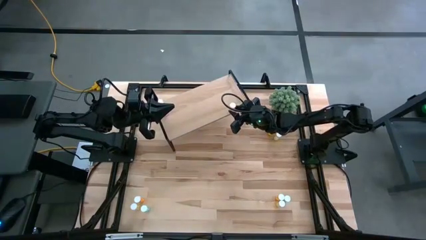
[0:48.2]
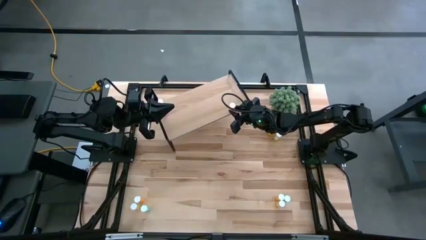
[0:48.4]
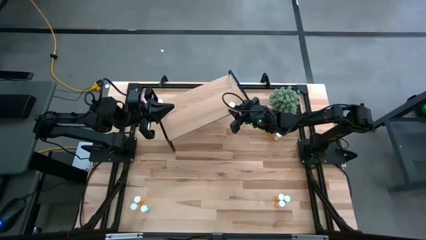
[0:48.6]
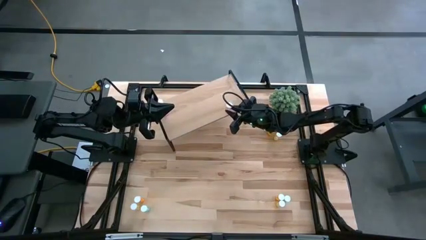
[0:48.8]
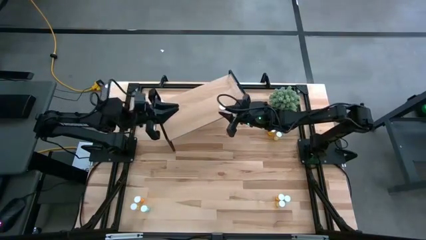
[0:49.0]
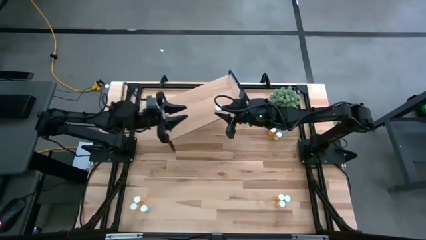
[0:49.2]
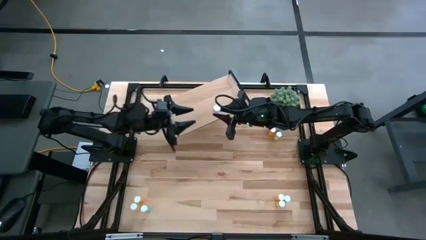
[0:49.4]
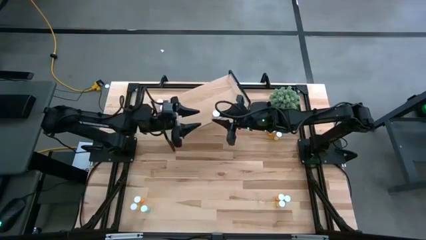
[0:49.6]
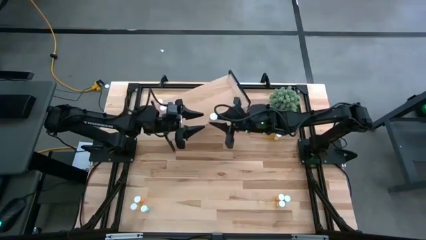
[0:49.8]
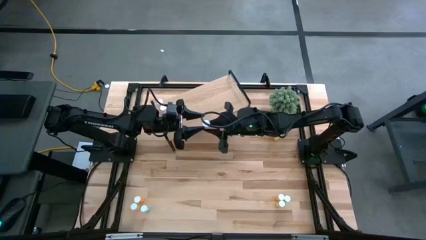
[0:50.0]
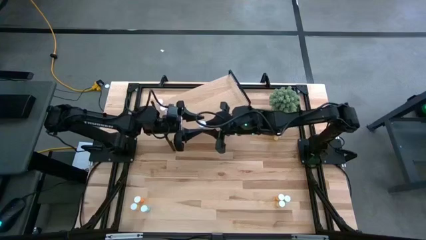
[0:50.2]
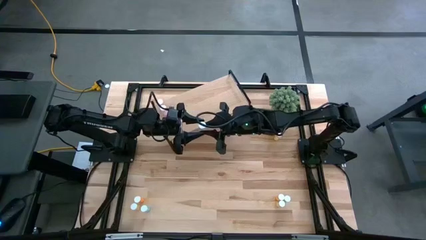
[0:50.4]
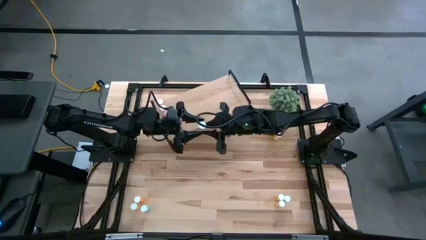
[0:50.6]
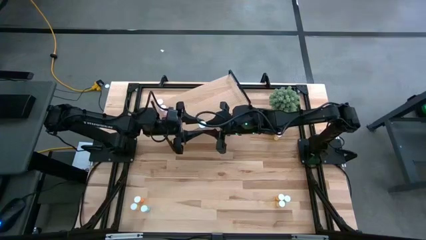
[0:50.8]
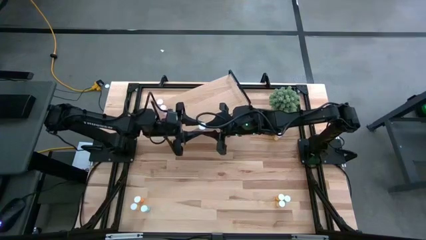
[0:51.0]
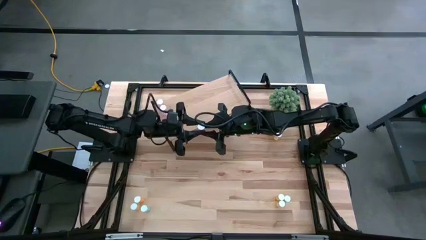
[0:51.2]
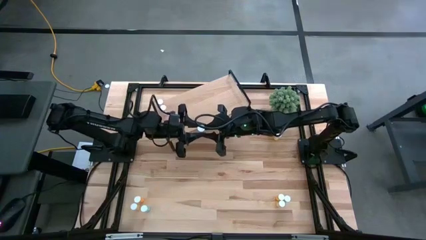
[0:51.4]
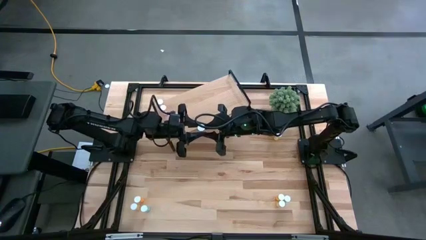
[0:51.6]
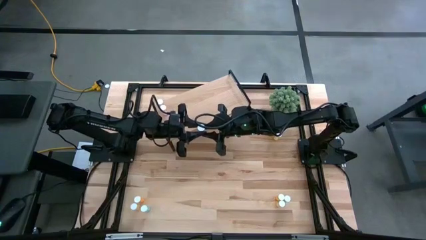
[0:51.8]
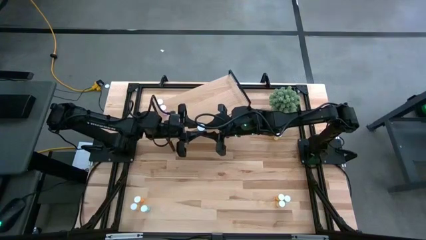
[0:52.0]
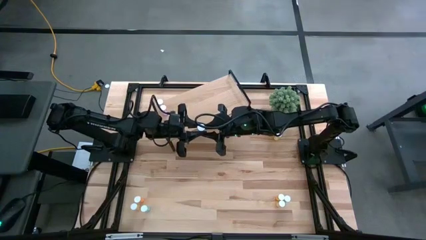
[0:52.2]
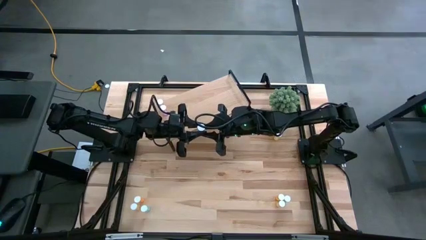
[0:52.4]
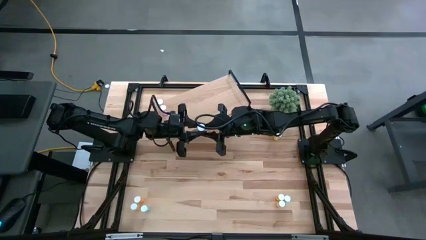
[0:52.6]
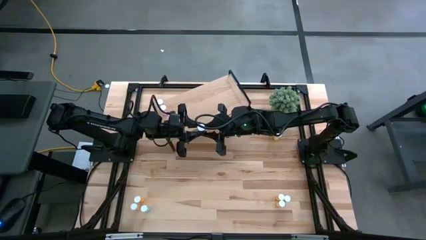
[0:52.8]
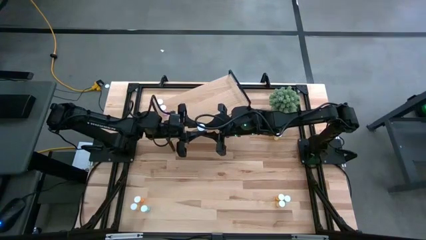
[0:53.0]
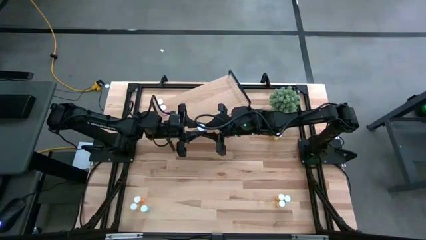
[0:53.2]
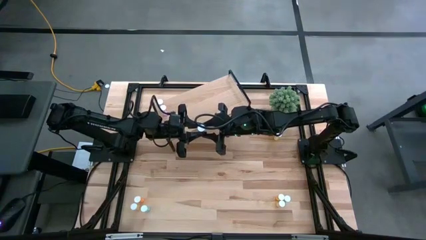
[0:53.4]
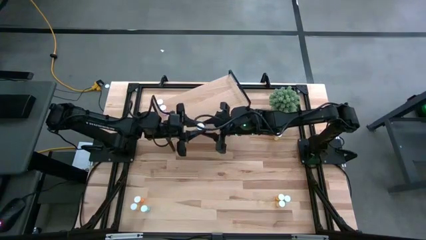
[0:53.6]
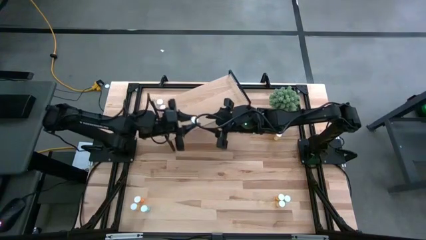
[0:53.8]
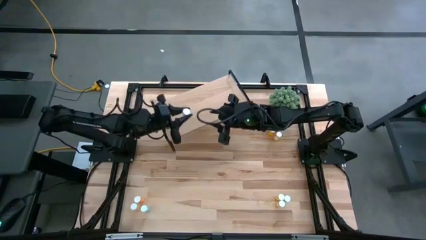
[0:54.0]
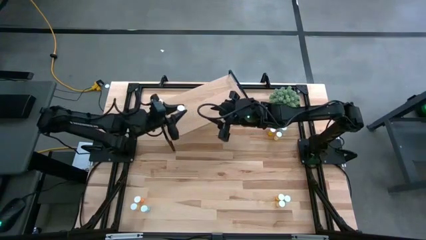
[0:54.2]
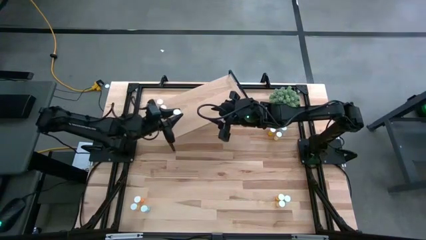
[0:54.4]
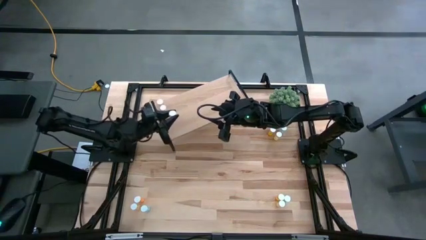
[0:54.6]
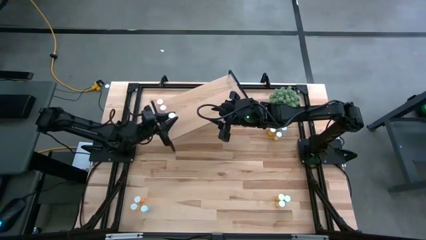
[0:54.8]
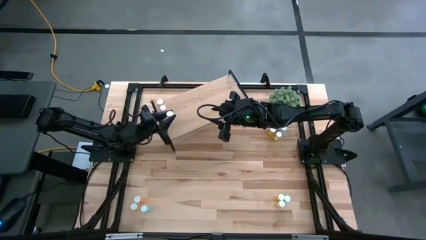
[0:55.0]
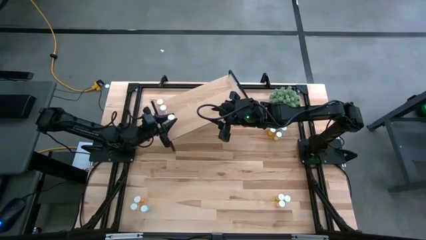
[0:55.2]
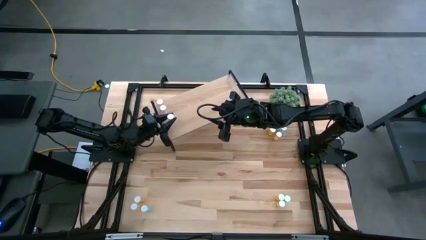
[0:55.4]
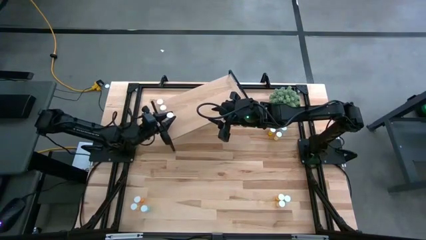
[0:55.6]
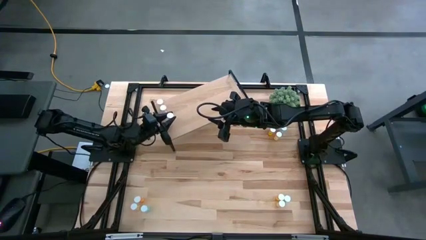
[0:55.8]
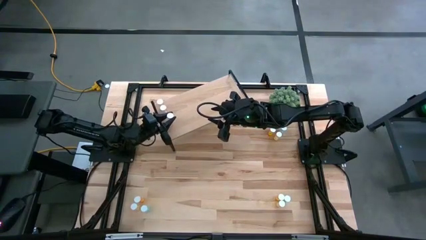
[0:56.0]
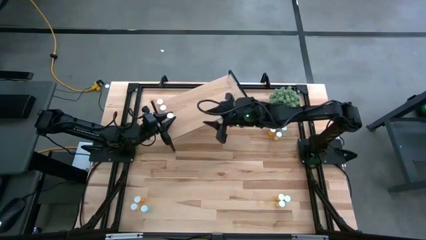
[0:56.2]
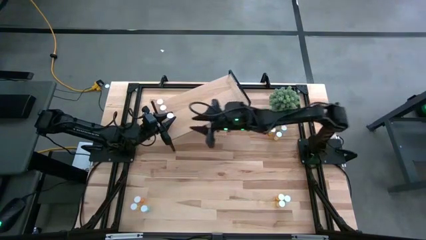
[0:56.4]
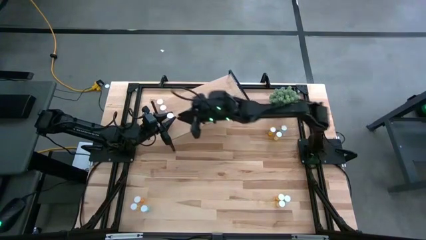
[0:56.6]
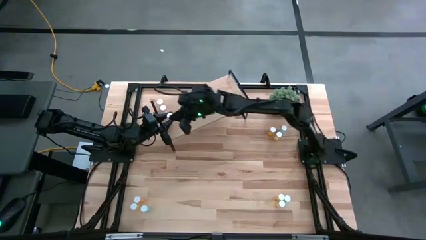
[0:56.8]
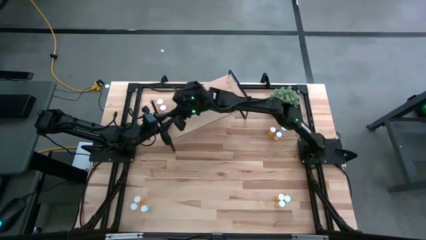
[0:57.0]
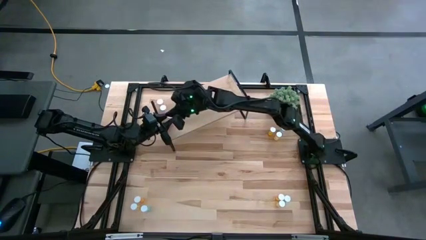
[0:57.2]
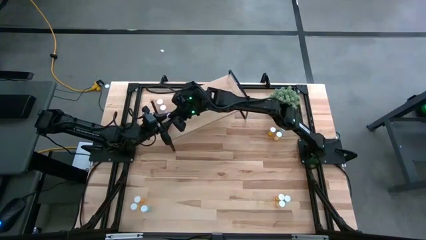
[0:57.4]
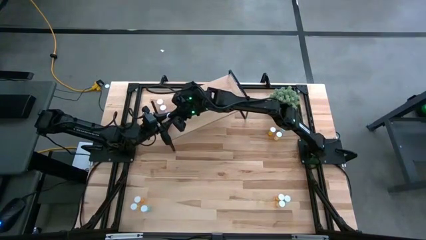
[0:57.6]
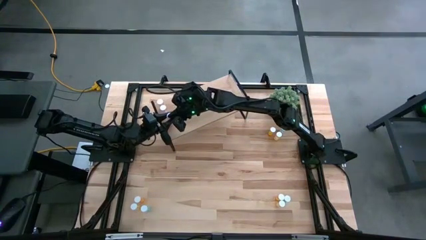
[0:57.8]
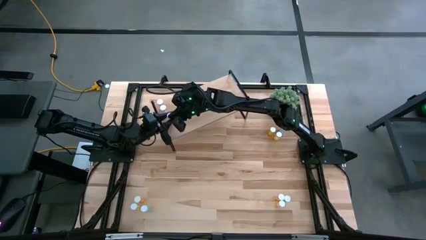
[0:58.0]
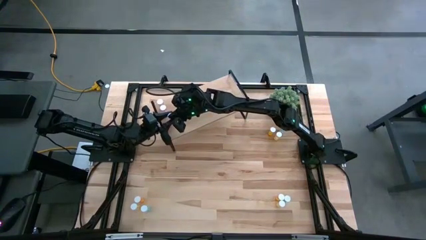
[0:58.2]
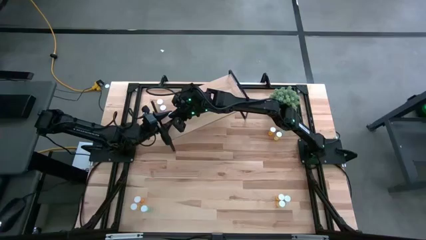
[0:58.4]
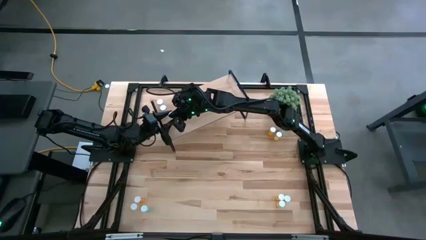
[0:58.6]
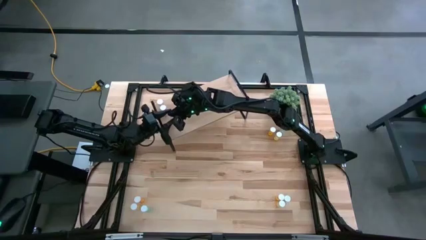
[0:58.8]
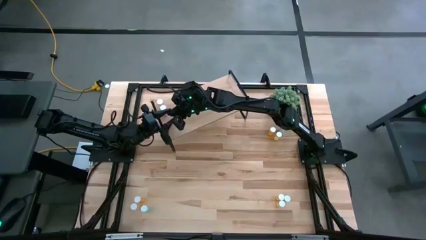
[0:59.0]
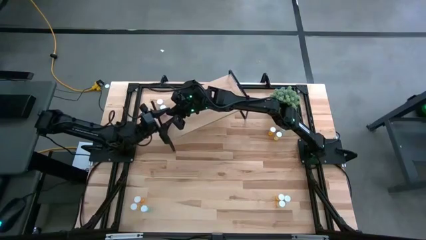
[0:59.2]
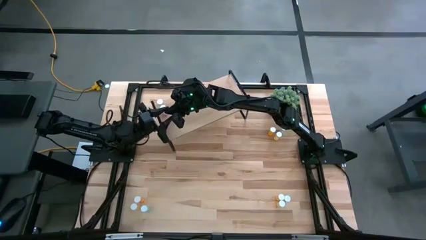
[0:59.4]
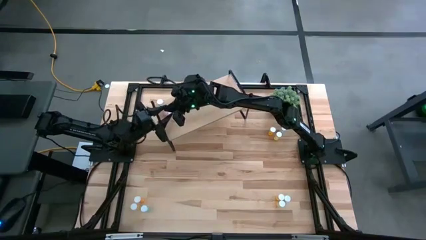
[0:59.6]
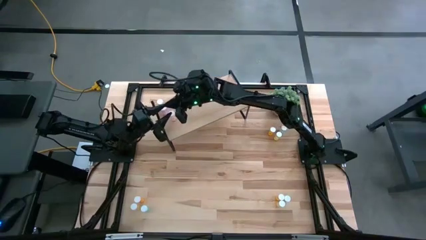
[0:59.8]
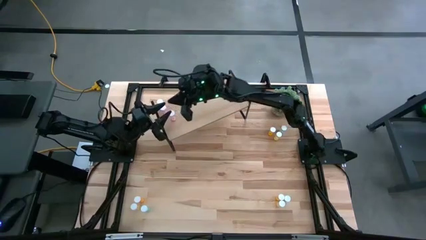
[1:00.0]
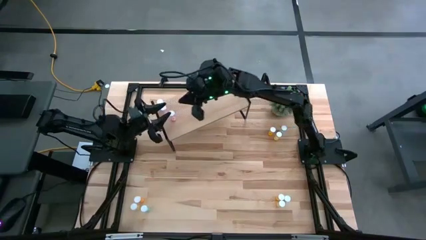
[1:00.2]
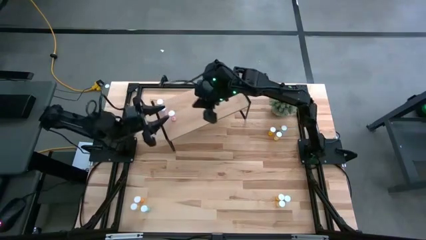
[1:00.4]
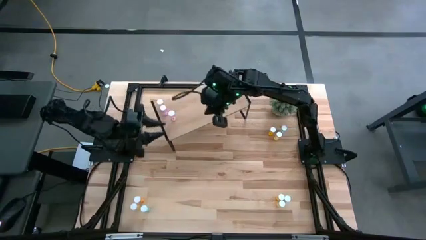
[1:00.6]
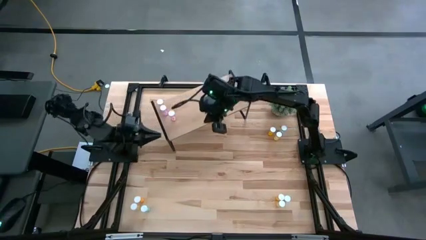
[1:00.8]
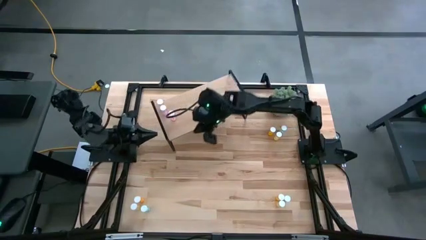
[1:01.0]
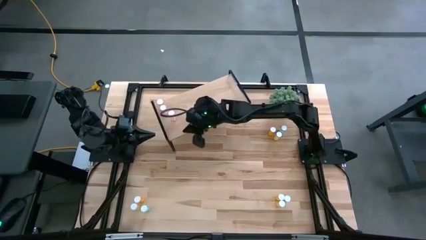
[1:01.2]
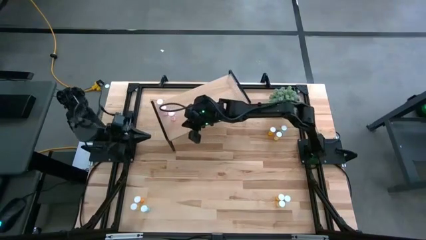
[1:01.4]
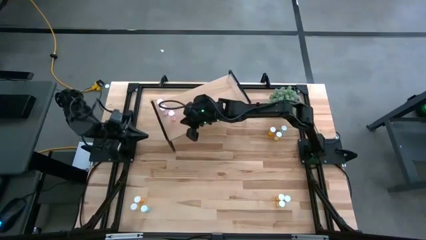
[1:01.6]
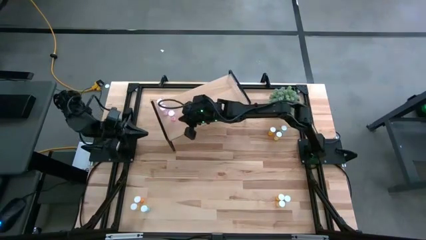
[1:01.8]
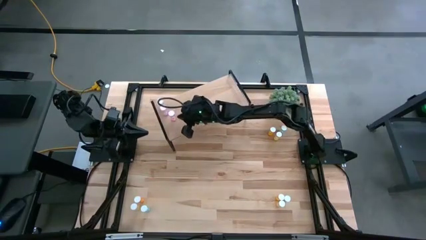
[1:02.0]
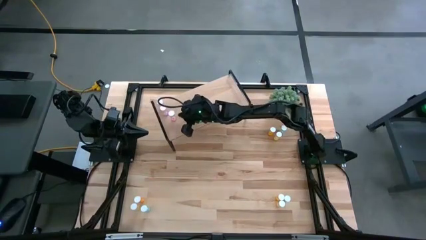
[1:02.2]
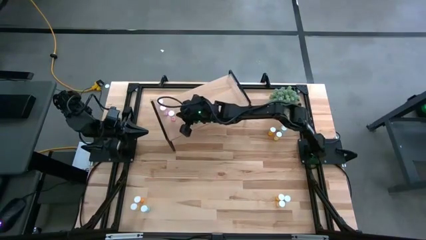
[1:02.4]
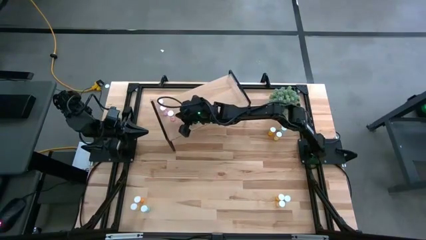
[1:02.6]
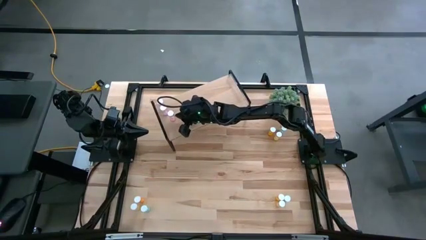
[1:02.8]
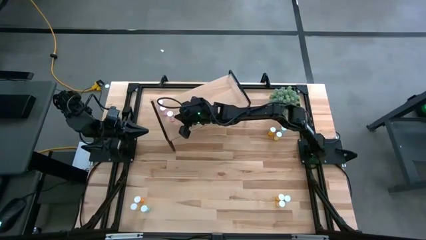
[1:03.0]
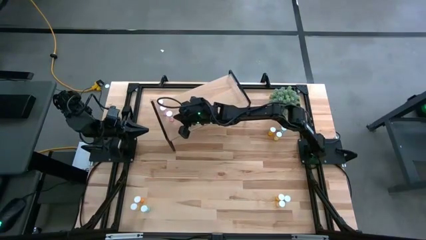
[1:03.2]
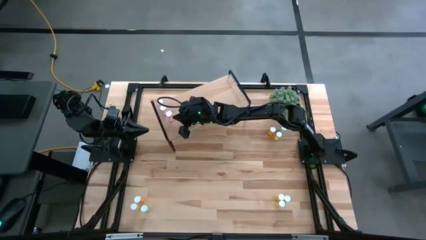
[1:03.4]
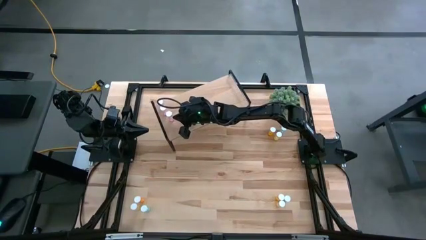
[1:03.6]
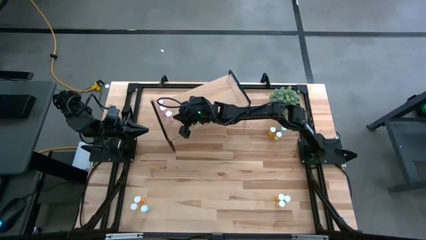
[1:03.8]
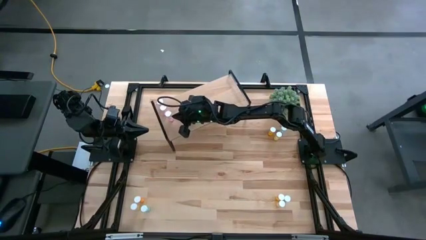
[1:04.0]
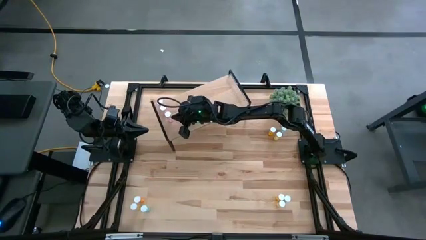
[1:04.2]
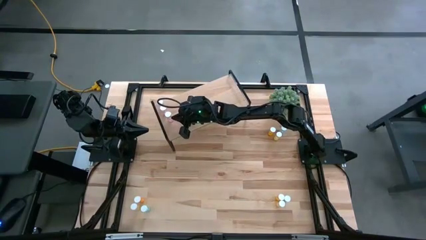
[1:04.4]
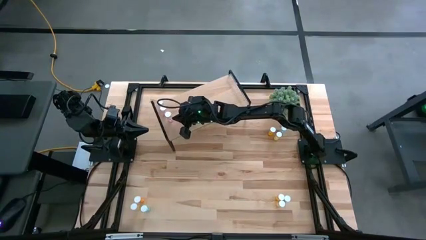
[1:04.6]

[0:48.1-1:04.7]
Task: Pick and place medicine bottles onto shelf by color
Put the pink pill bottle on the shelf aligned with the other pink pill bottles
